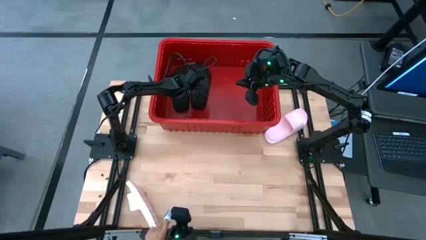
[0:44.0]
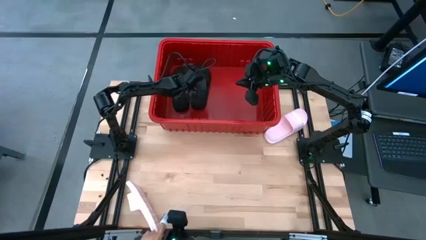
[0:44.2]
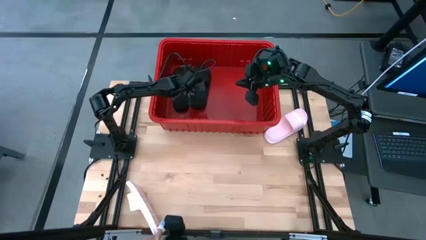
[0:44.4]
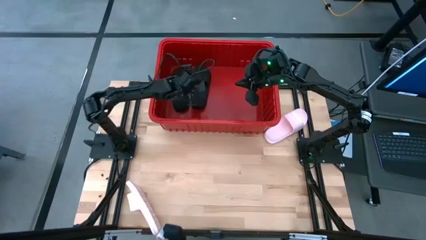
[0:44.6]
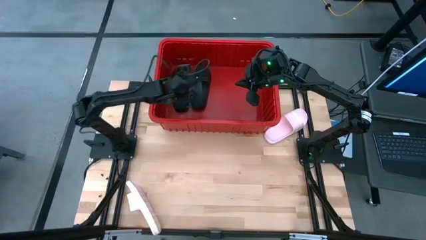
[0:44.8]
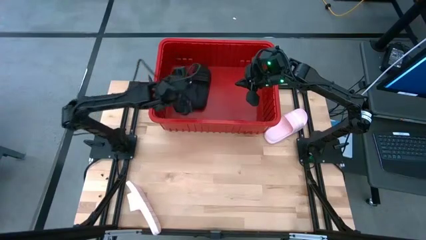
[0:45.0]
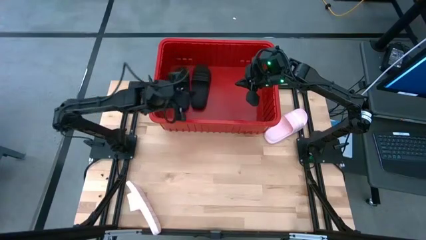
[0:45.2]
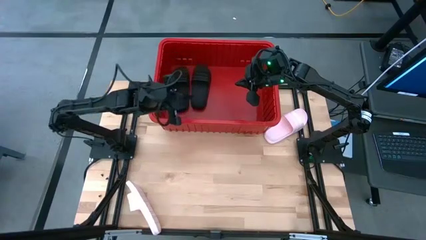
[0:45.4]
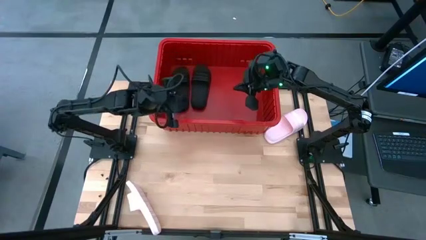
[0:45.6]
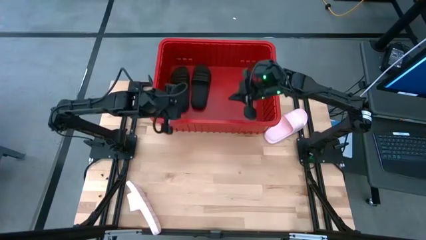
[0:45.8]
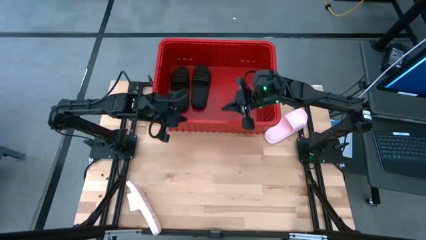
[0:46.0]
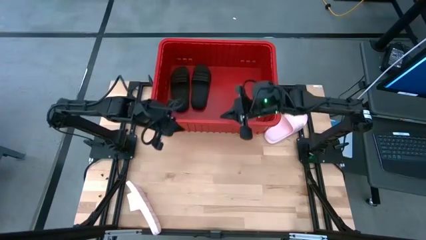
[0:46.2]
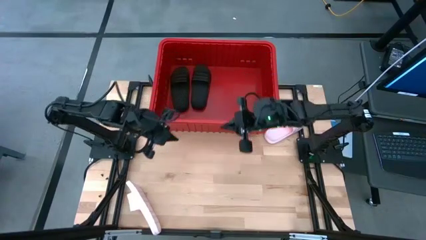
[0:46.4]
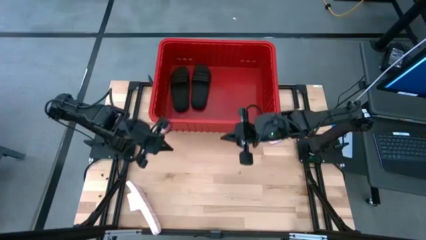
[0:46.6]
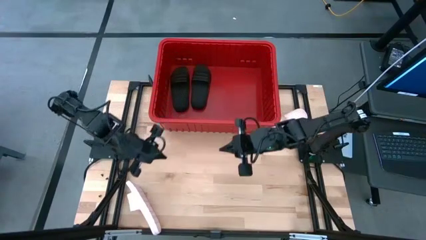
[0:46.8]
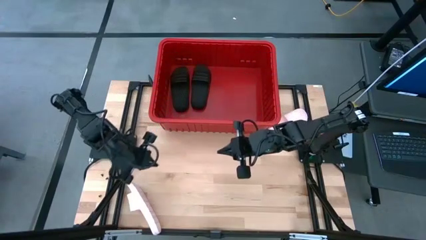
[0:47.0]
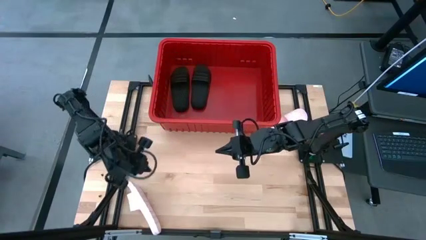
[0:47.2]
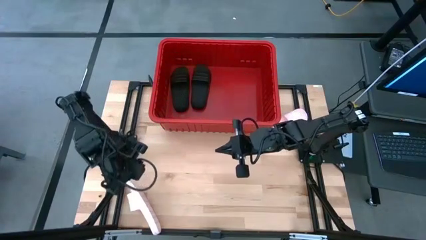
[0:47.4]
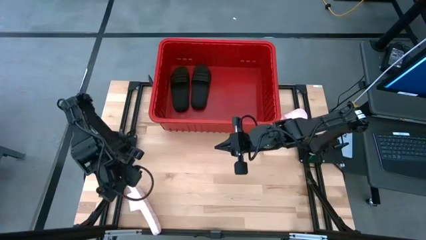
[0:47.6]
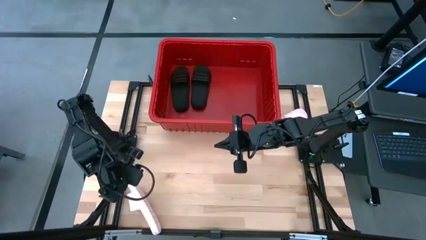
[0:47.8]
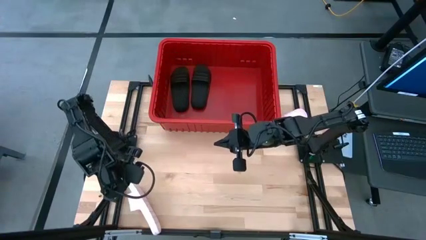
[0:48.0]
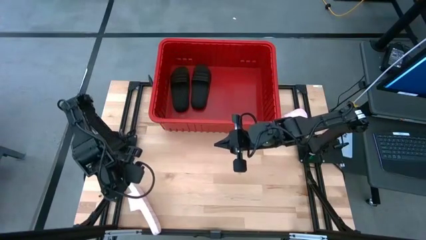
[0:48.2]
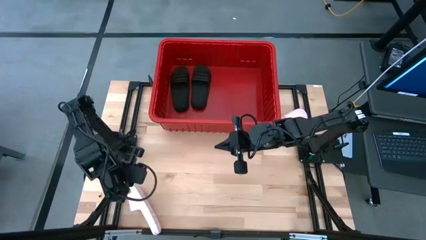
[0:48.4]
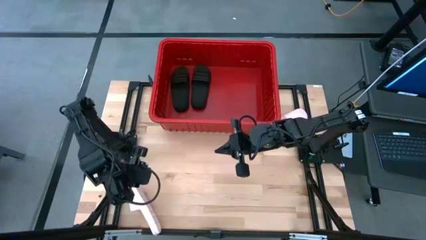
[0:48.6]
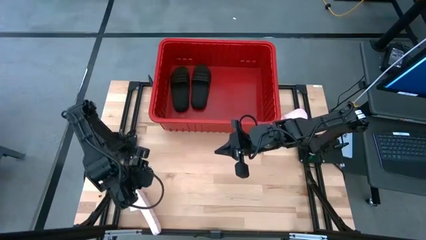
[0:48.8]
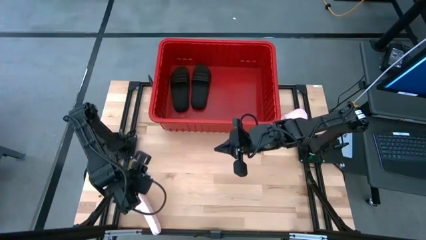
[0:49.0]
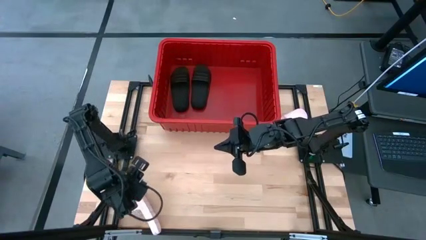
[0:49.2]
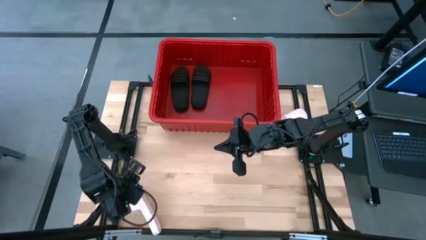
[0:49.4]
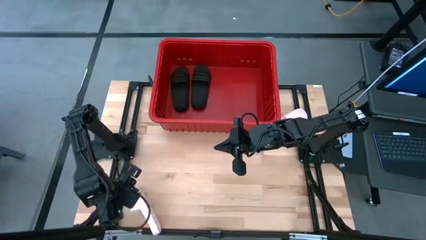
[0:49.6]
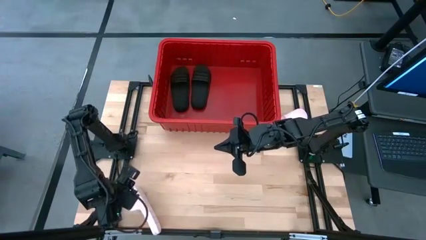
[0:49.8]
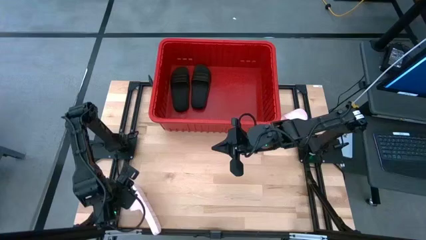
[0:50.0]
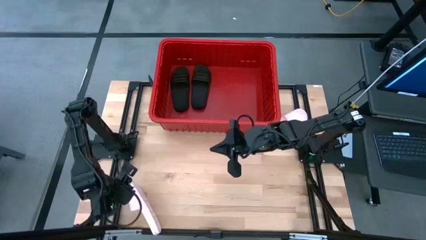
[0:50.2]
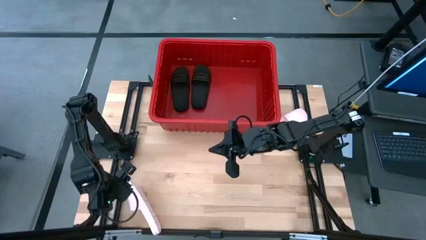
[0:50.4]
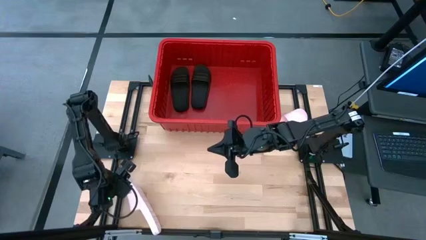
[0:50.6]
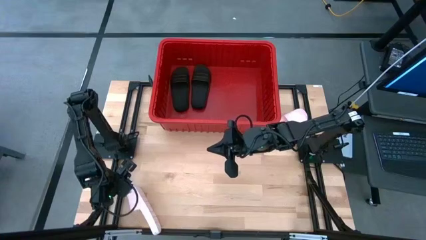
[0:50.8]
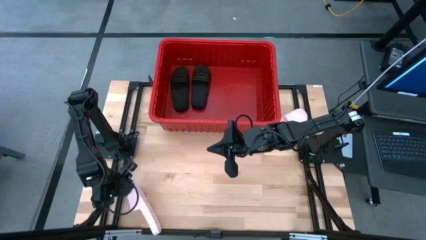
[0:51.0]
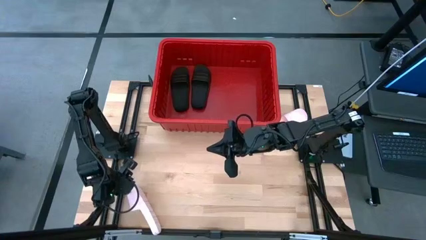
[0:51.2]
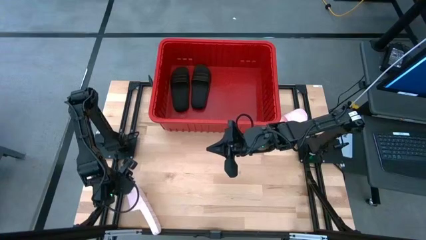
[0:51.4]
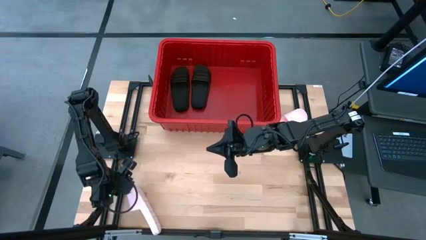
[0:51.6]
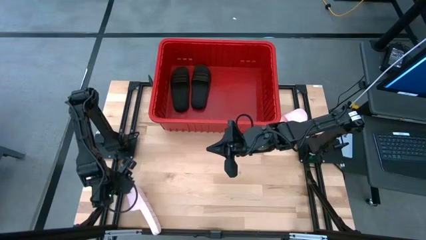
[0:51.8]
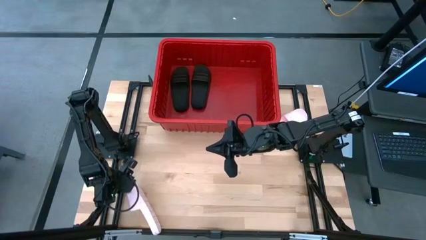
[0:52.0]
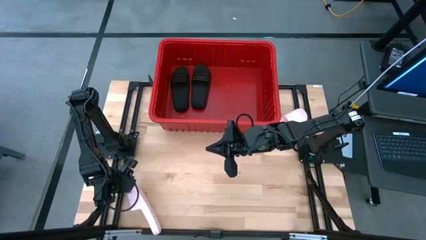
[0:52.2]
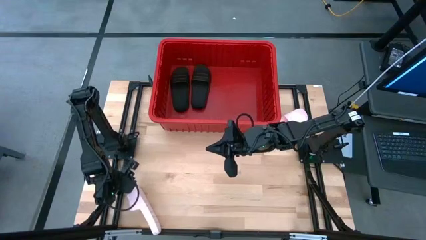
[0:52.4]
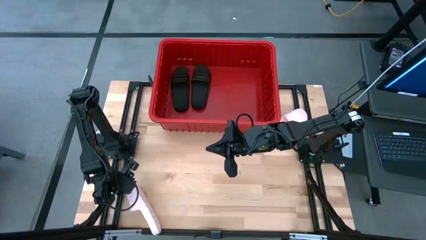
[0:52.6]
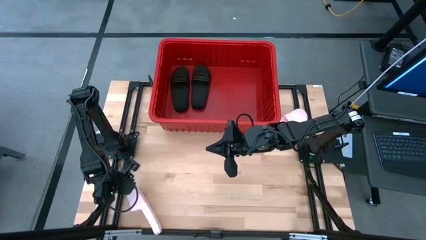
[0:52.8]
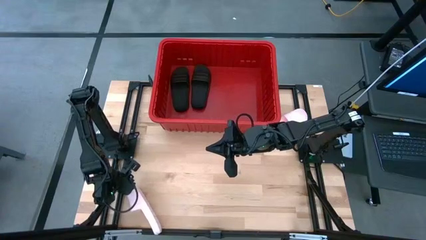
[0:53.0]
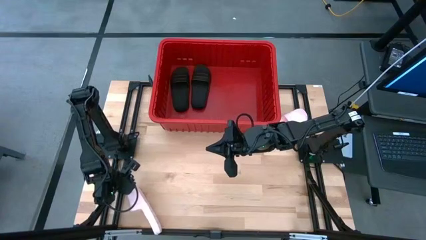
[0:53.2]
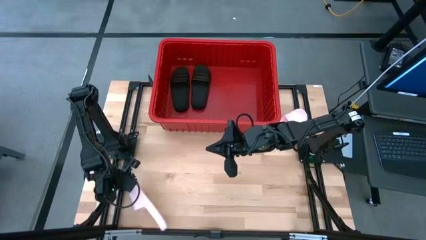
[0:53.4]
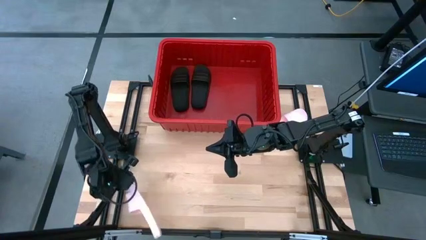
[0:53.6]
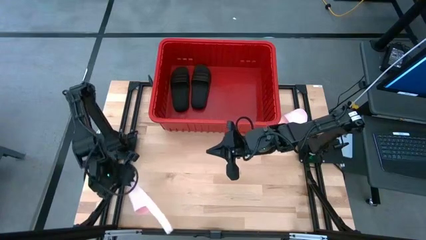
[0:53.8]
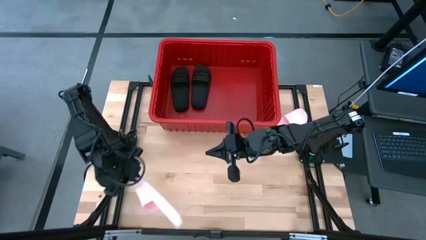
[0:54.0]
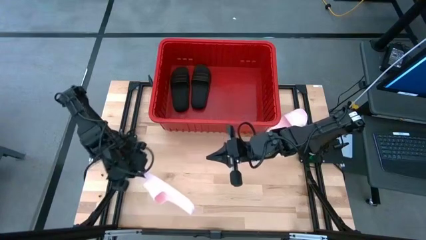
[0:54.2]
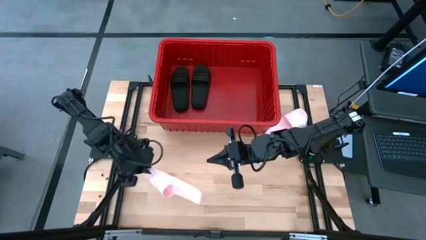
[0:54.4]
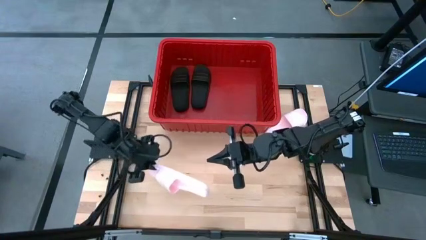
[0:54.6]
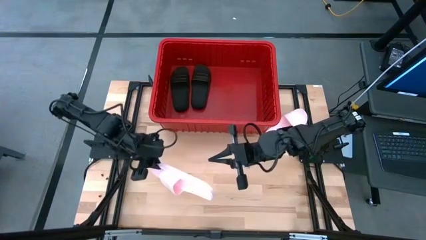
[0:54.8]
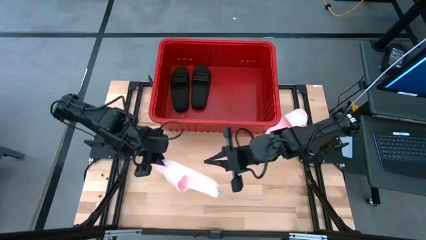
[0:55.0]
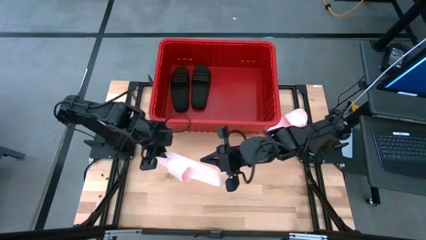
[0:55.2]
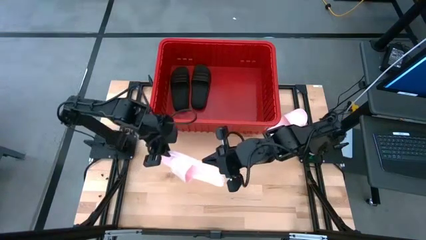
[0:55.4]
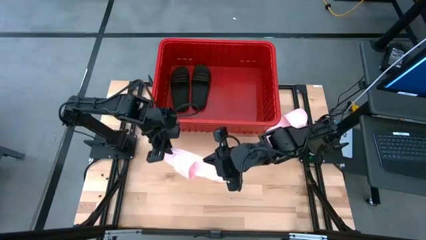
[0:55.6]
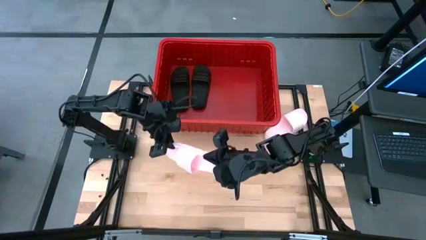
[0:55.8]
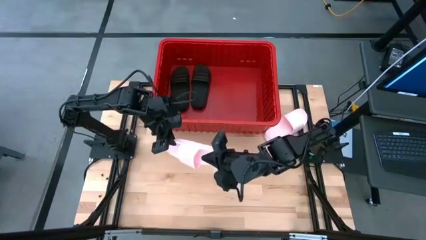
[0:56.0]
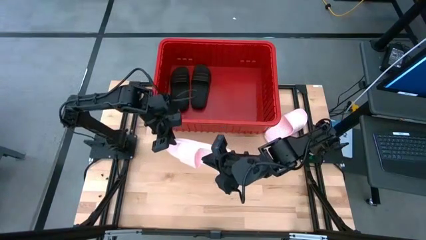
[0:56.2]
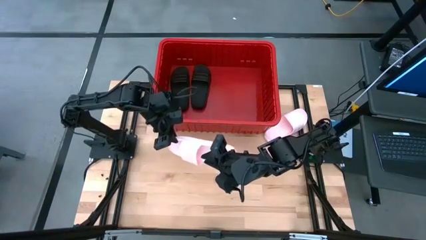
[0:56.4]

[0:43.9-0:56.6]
Task: Pick and place slides into bin
Put the pink slide into the red bin
